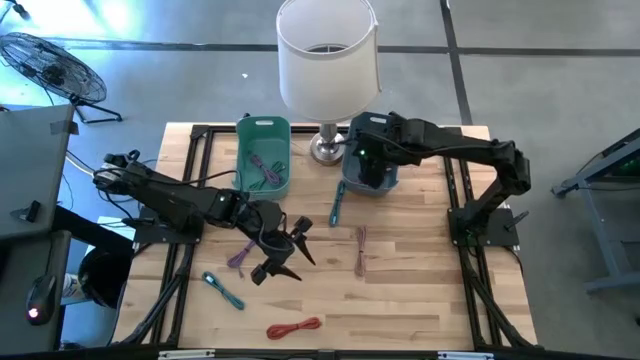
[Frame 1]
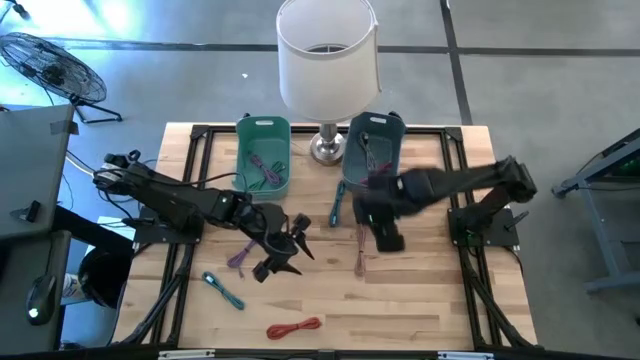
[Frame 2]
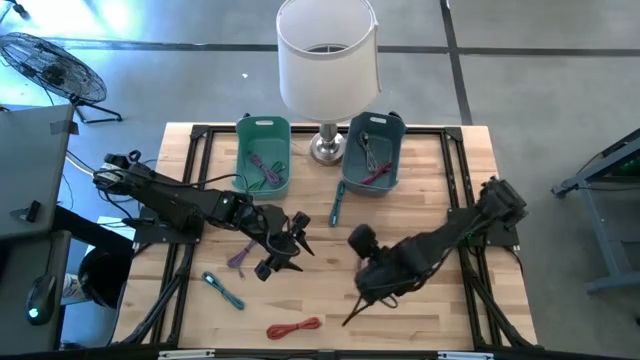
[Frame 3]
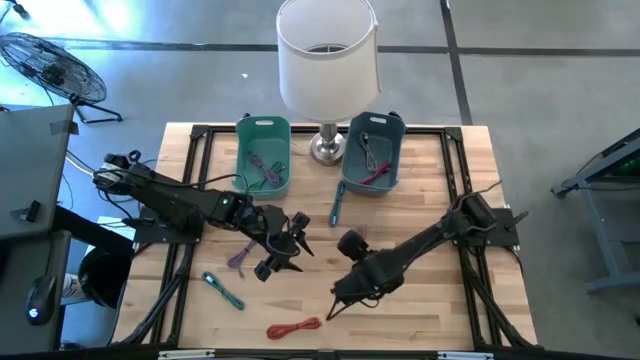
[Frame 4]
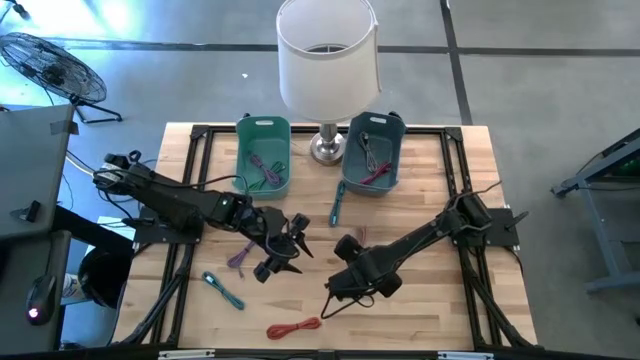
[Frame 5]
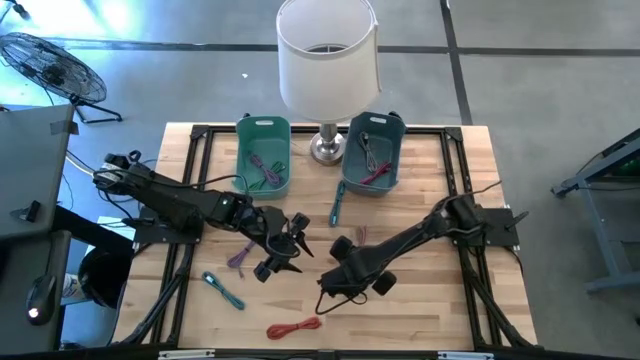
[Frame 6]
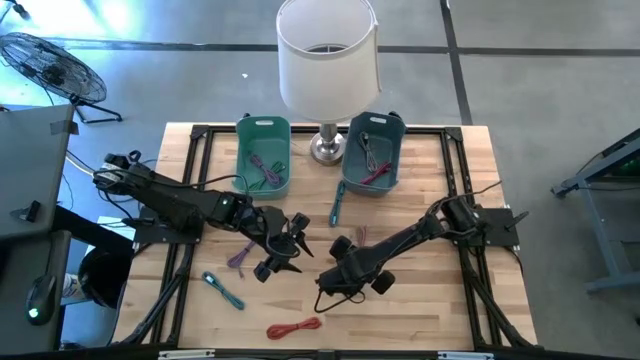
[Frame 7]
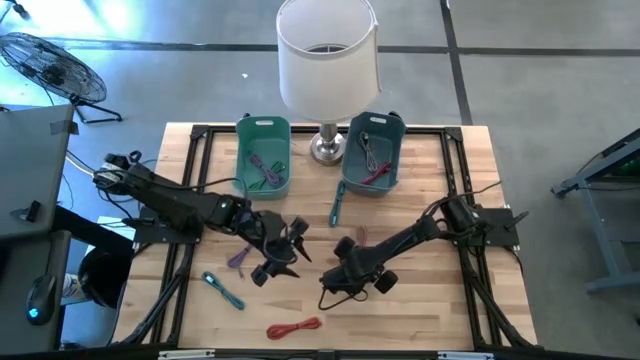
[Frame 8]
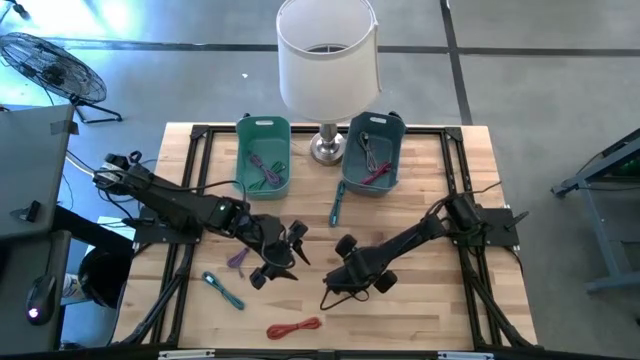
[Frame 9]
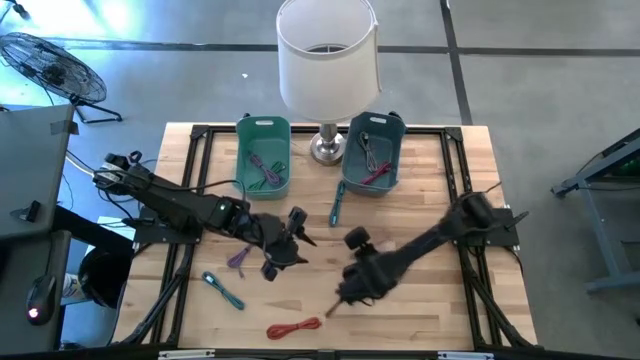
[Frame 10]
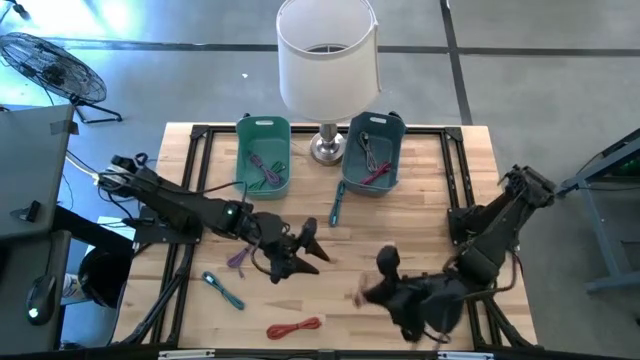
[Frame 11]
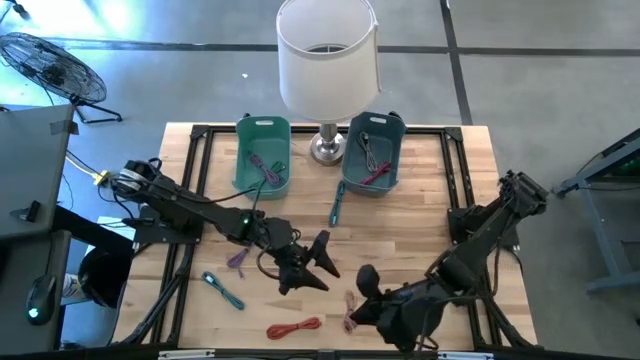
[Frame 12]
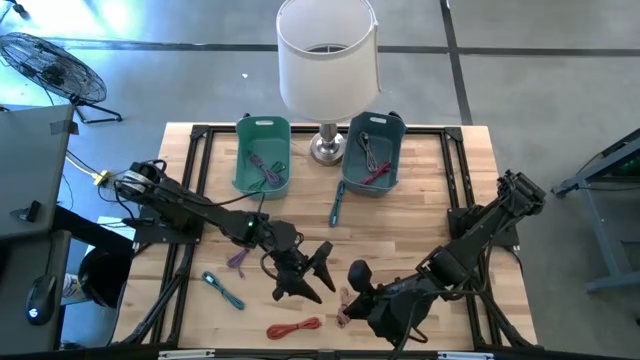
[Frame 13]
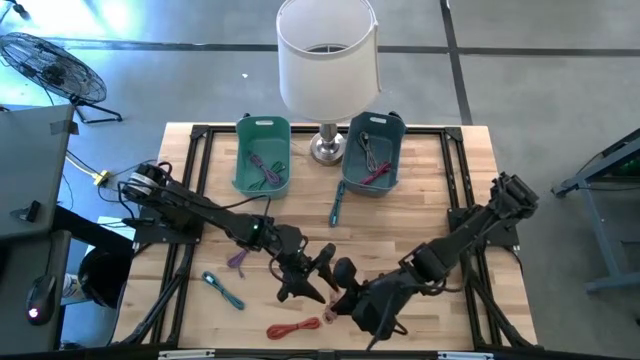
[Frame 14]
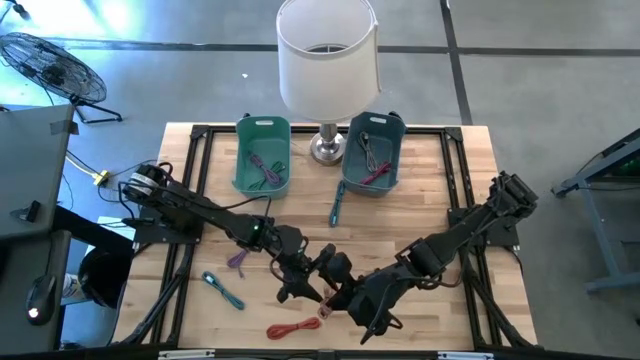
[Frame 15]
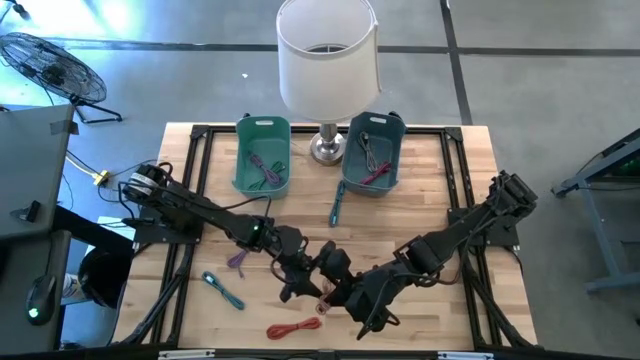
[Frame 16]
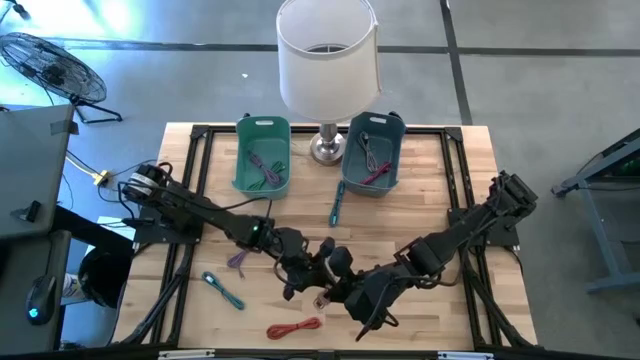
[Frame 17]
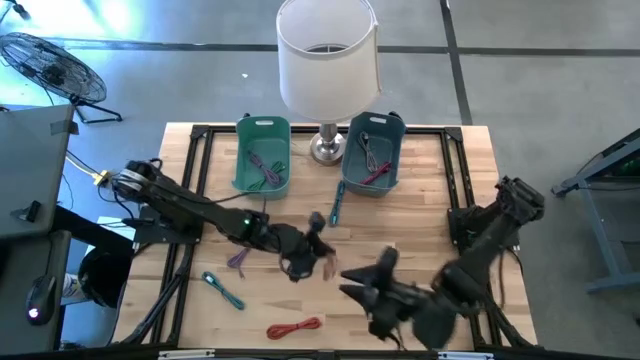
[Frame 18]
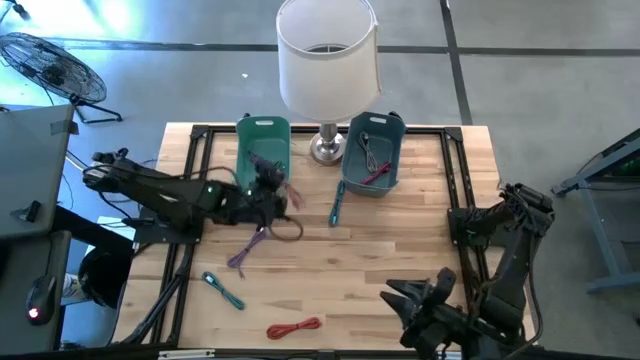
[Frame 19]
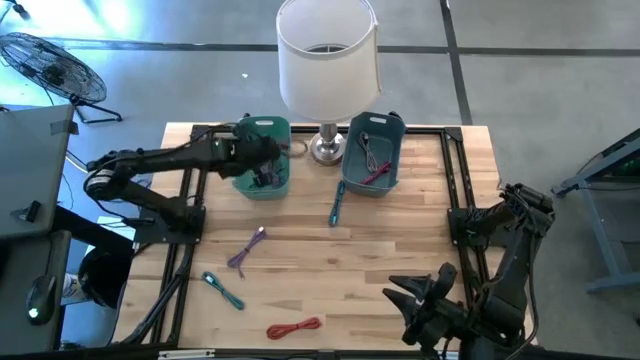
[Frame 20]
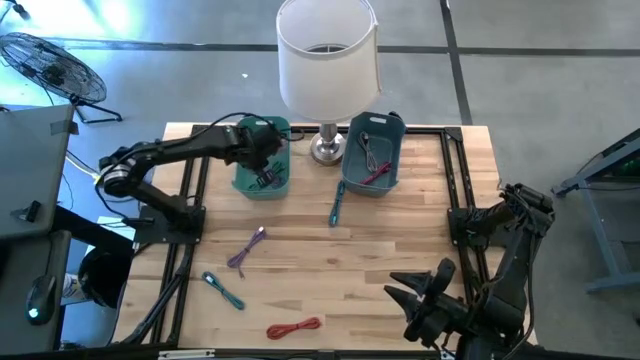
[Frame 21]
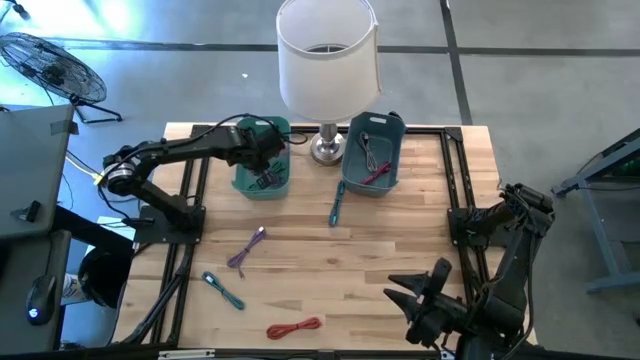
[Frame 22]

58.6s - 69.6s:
Task: Pick & Place USB Port
Put the pink charger cable into the green bin

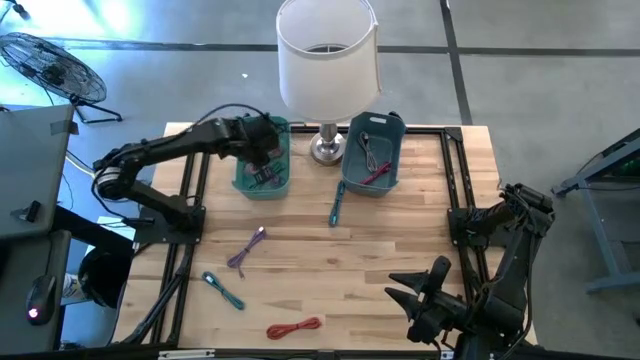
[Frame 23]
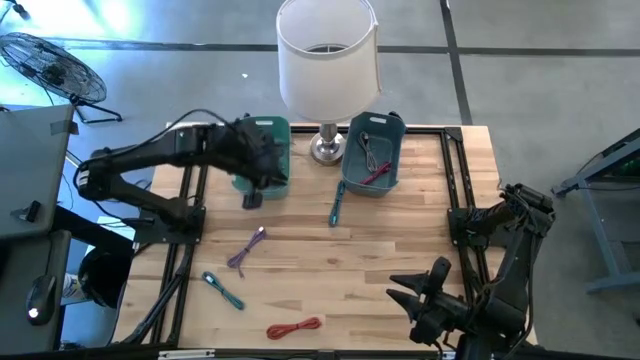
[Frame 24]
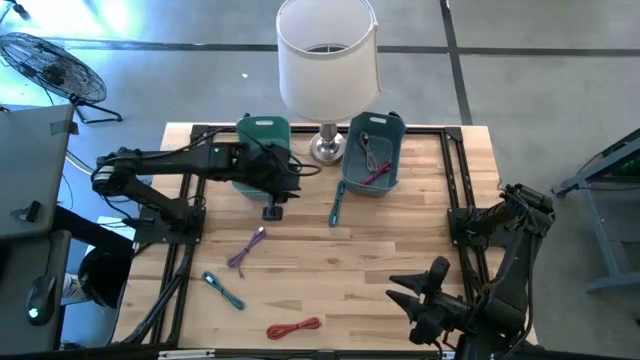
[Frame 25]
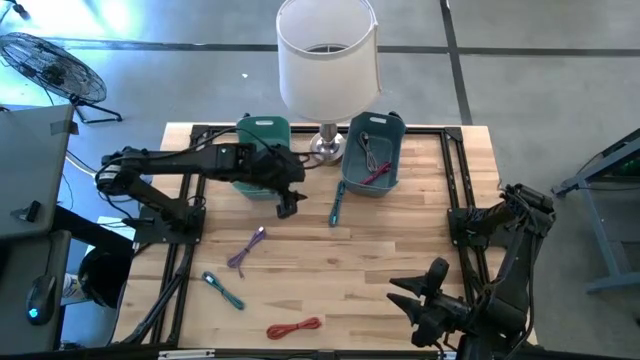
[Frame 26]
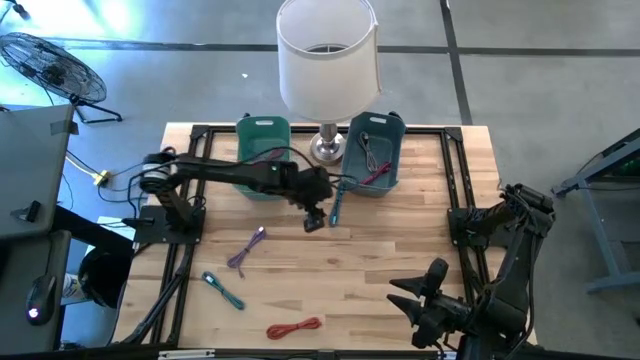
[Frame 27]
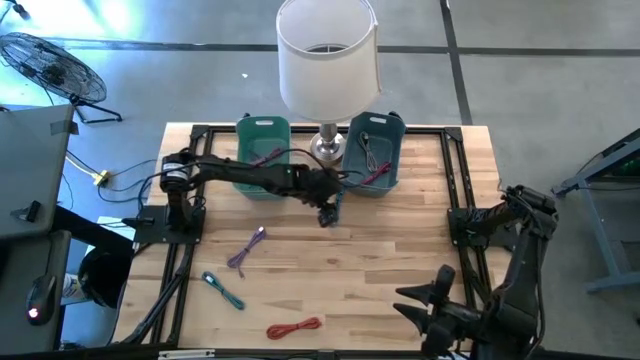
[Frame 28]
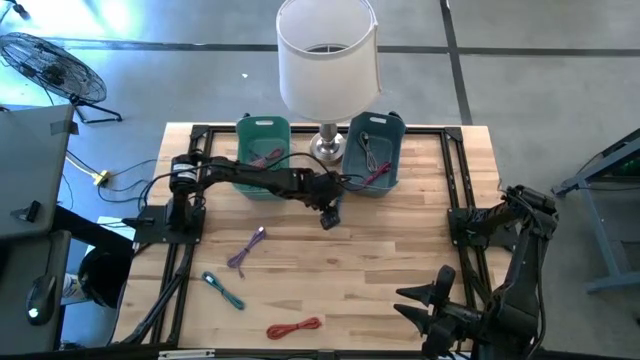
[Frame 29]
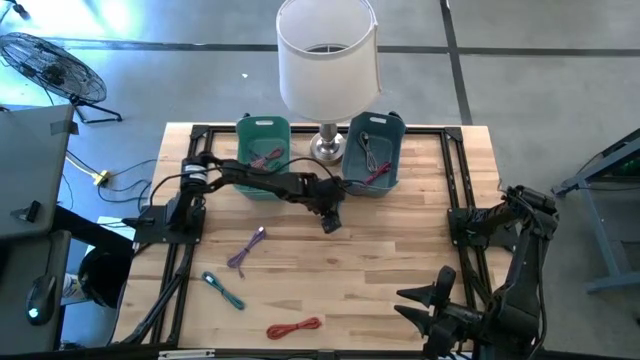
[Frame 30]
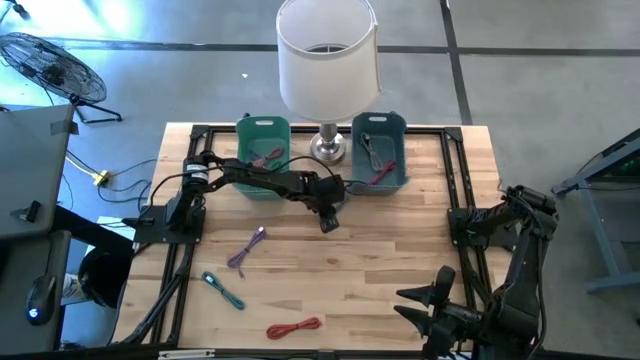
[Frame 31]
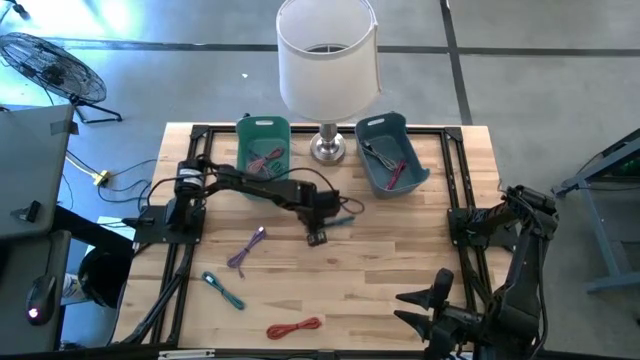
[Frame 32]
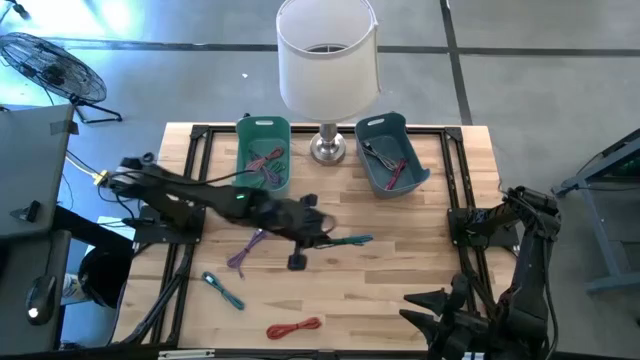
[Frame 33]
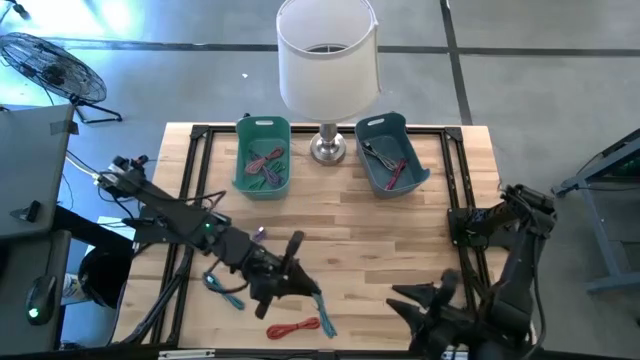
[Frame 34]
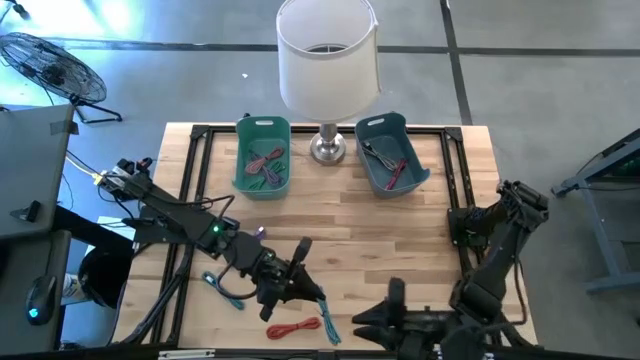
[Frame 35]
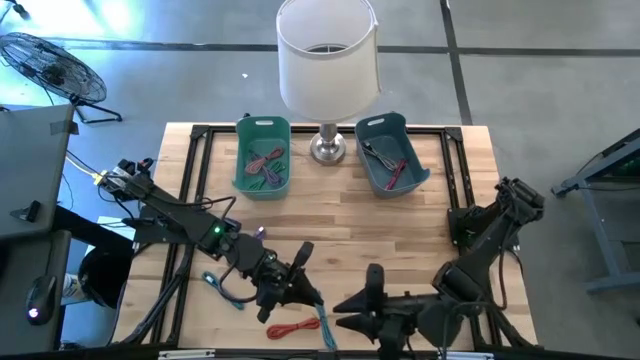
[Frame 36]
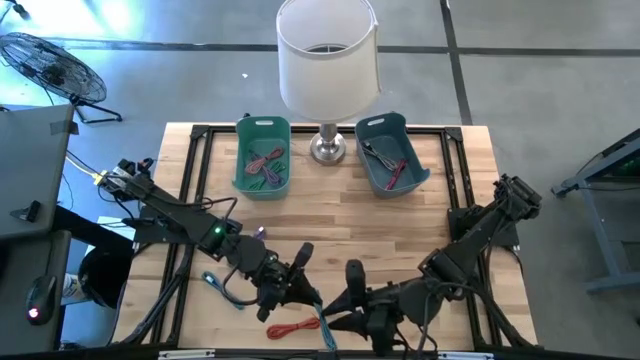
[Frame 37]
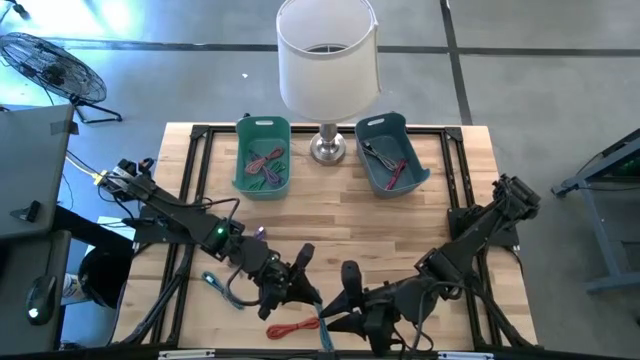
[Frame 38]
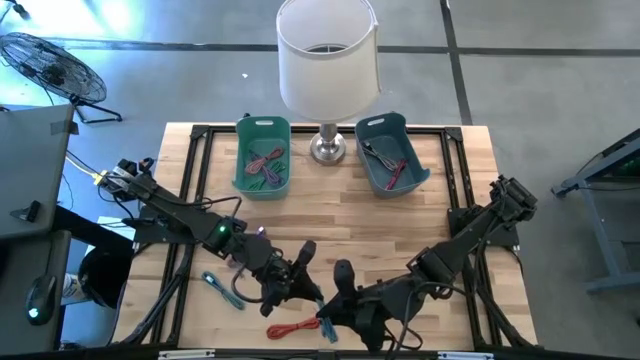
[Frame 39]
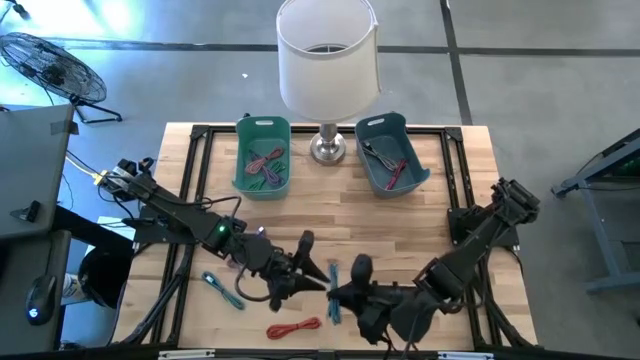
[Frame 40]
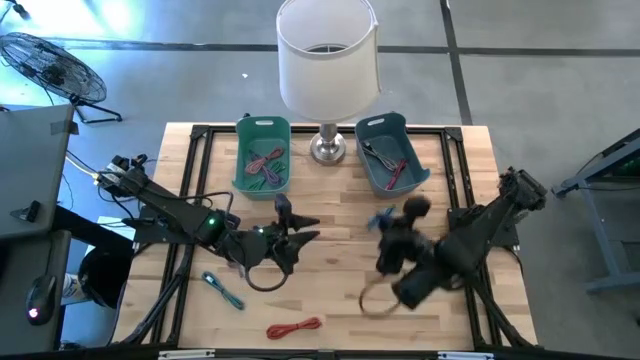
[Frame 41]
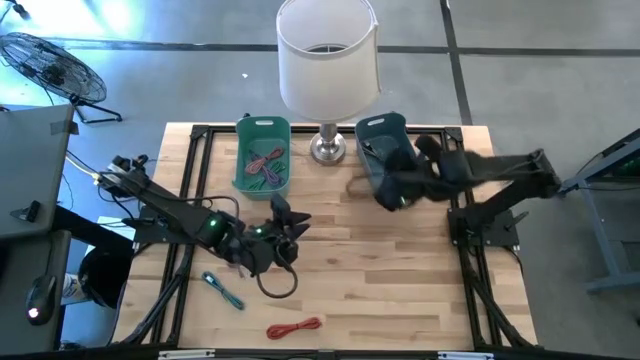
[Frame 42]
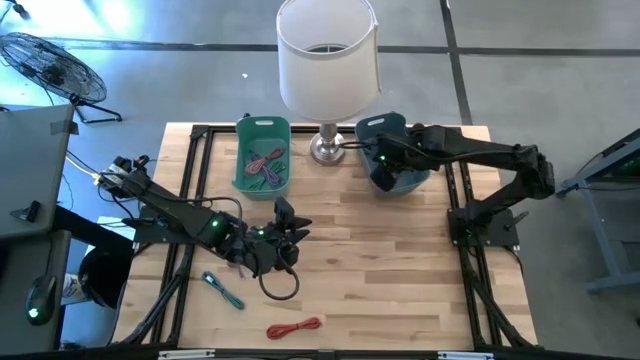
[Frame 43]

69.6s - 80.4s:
Put the top blue patterned charger cable into the blue bin
